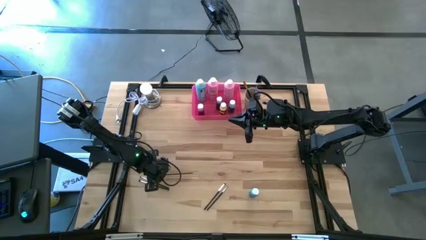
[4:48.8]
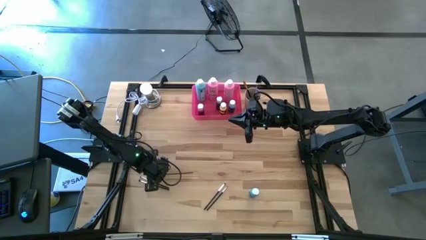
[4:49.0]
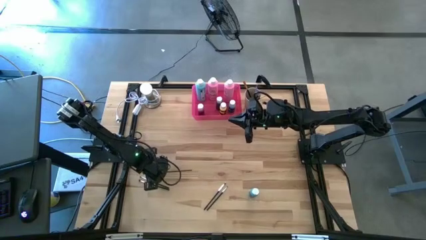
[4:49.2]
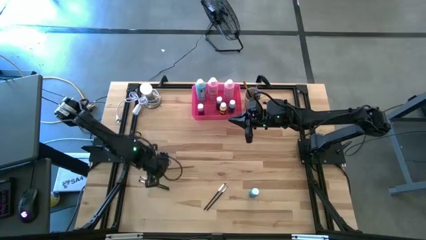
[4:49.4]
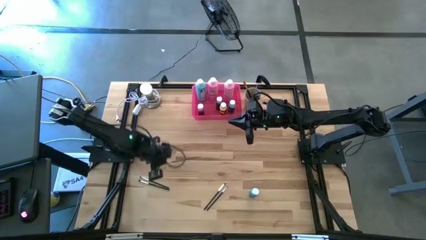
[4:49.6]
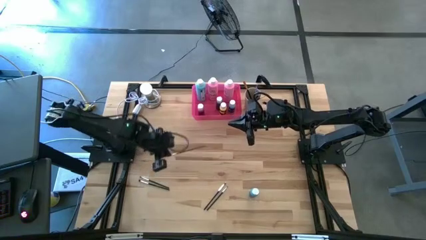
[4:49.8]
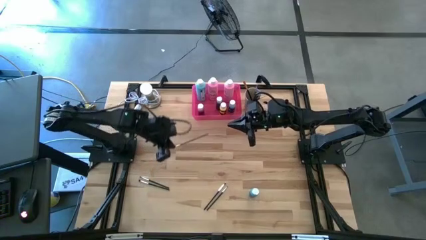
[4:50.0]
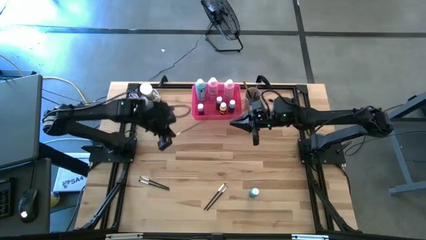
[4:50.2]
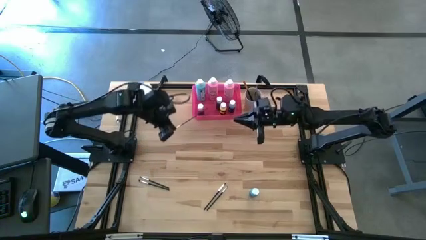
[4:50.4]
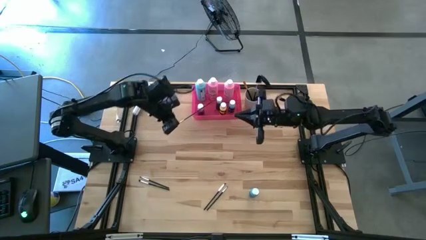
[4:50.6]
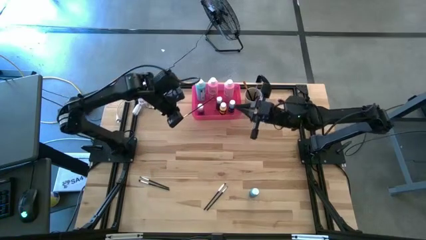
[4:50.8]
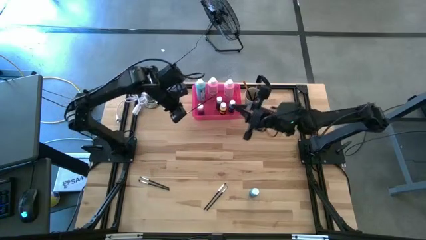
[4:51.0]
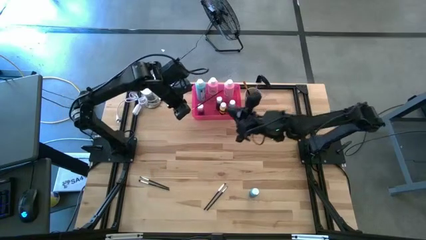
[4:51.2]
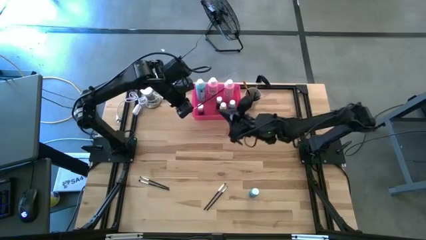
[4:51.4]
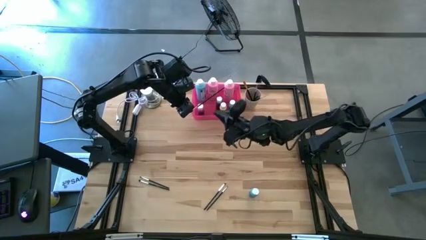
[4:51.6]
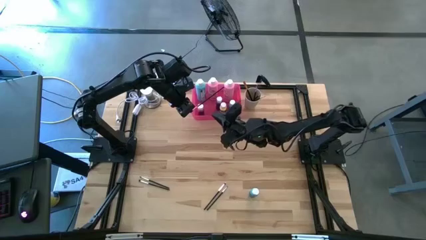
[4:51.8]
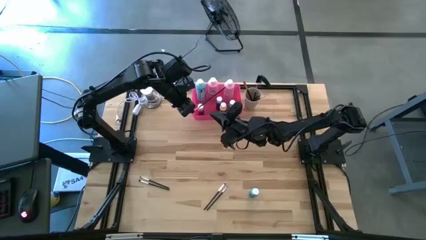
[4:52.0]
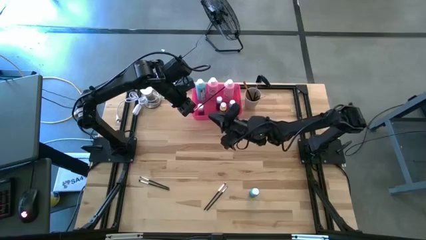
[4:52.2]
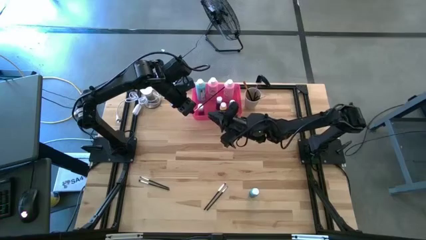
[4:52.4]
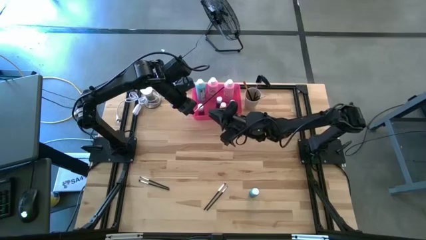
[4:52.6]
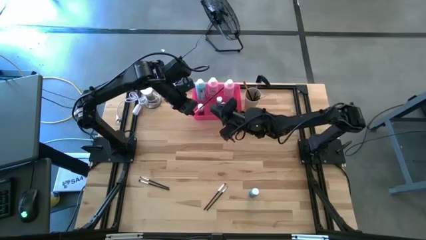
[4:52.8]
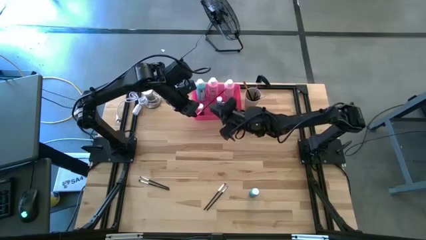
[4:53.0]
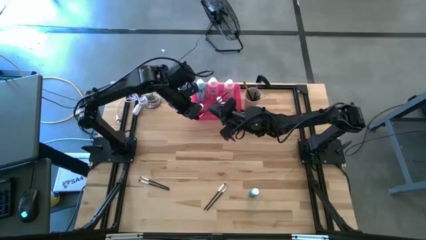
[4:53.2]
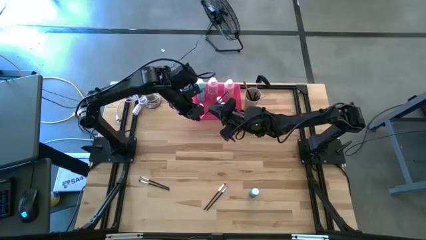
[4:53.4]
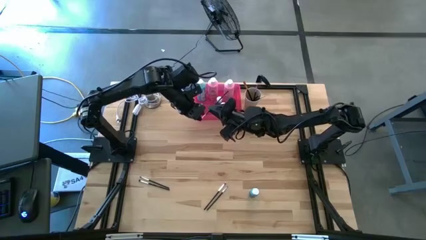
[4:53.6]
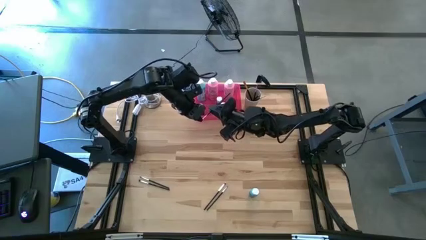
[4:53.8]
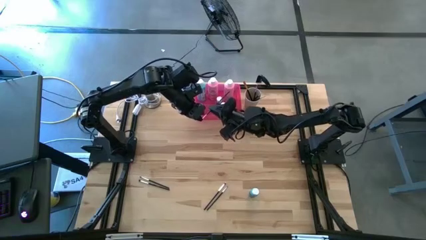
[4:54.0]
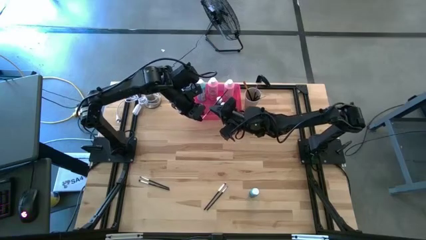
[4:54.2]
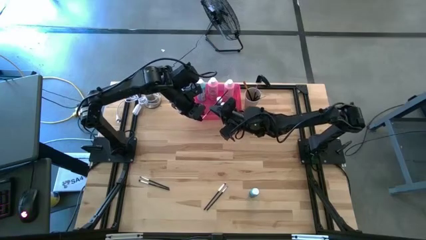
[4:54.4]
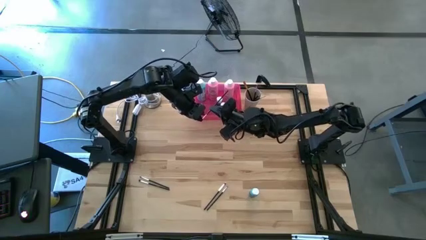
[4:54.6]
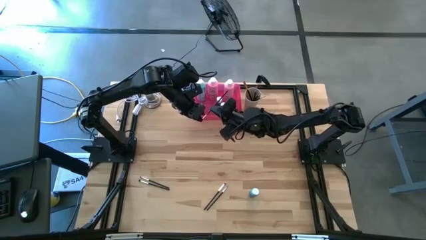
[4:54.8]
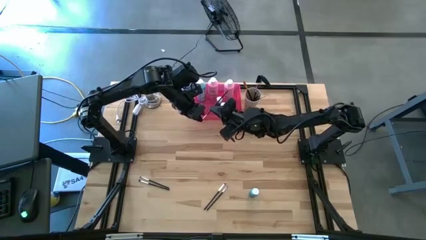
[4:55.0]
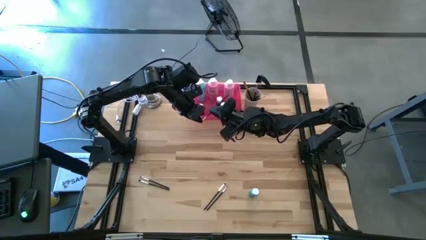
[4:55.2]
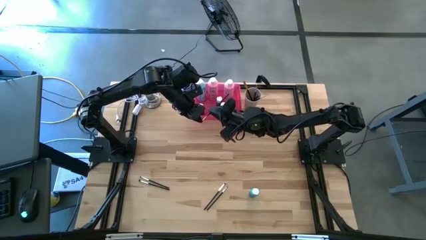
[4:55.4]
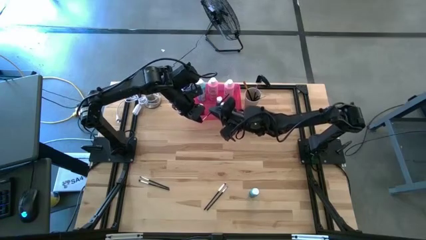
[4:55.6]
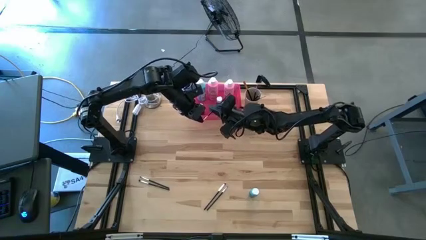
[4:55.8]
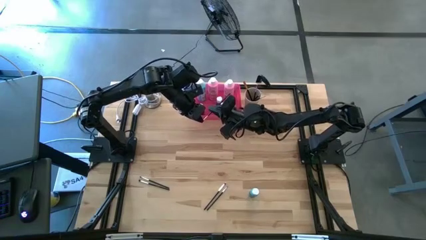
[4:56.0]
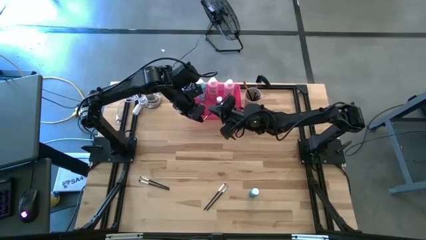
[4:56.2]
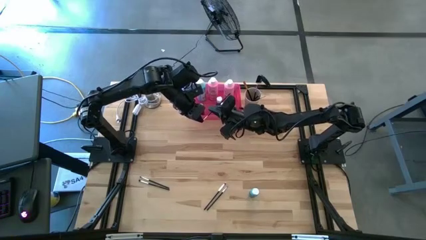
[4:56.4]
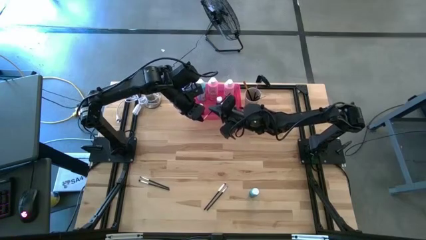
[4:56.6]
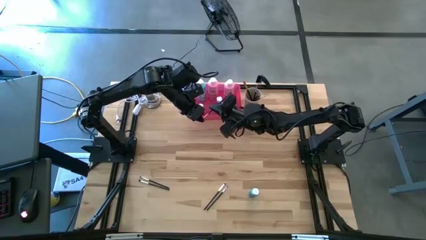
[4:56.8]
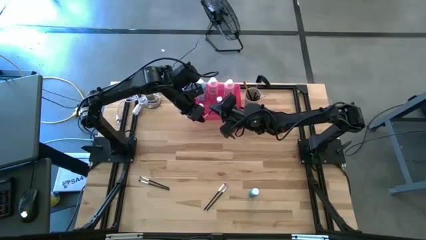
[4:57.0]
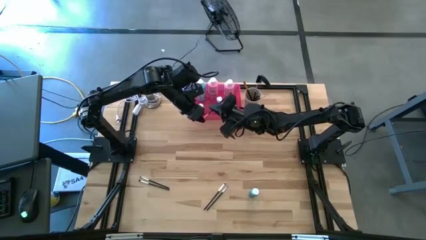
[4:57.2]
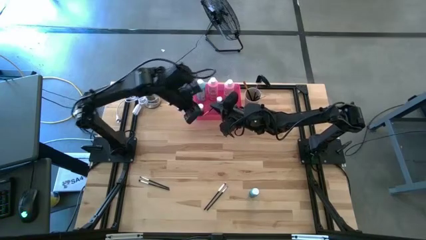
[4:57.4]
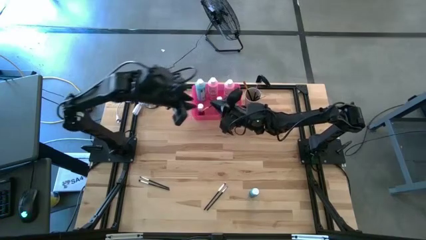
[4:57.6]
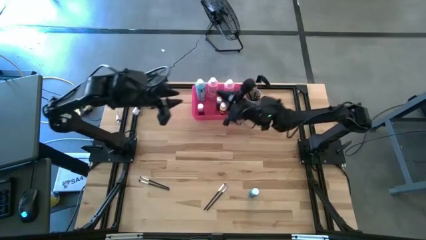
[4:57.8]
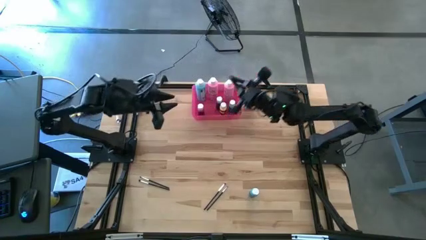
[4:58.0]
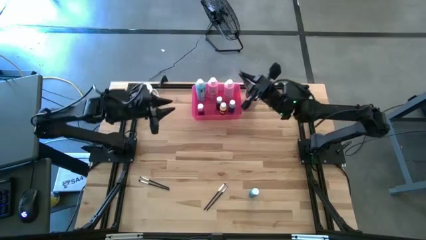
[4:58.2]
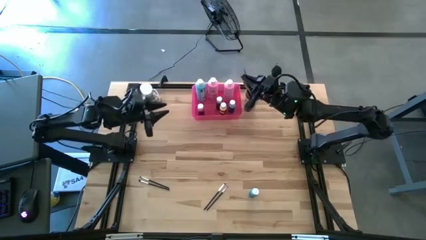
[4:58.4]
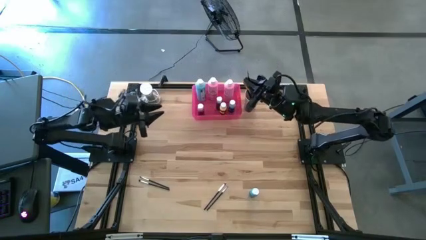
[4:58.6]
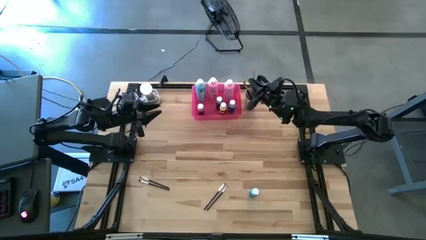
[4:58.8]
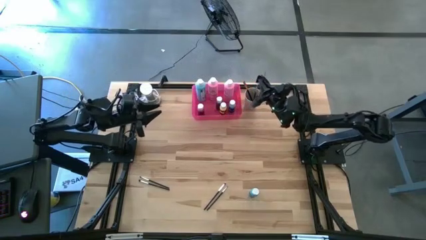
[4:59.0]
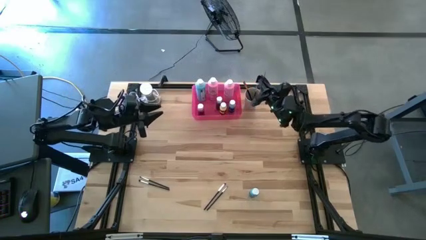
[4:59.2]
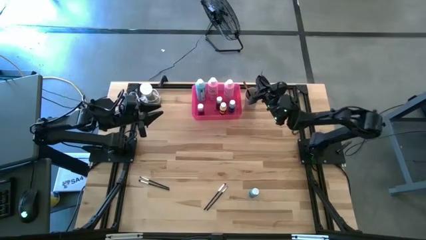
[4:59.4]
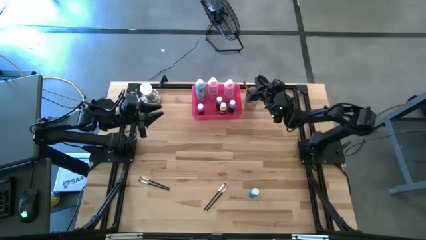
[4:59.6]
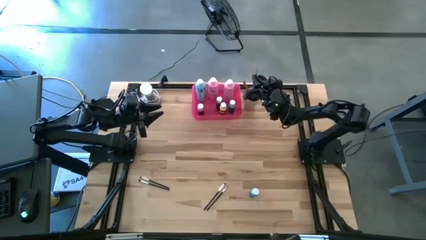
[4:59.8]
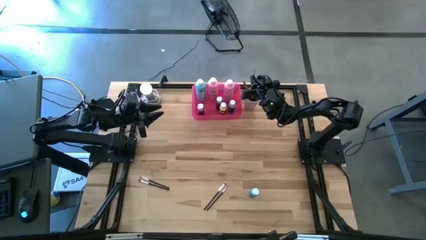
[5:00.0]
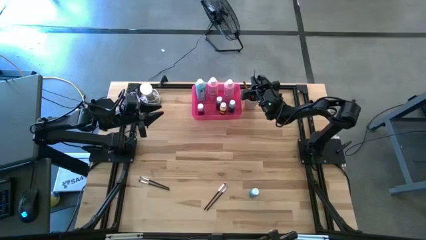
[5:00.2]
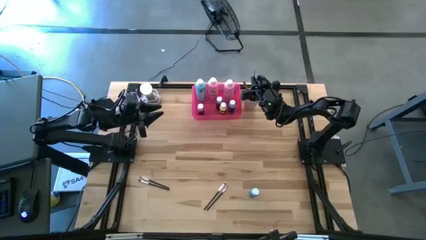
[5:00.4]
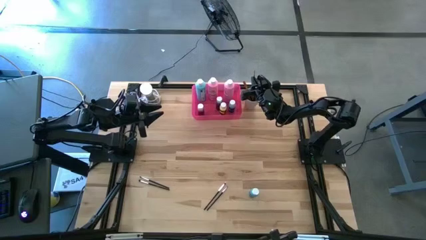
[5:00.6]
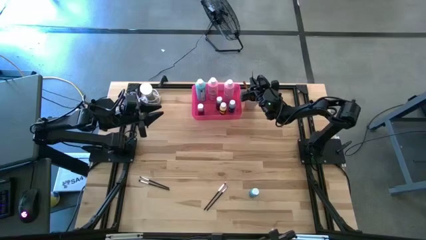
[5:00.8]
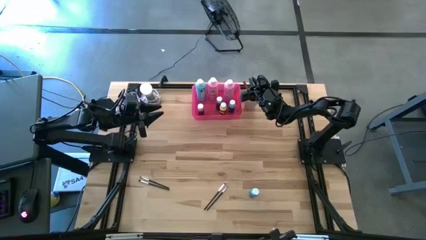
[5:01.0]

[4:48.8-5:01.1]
Task: Pick & Place Paint Supplies
Put the orange paintbrush into the white cup
